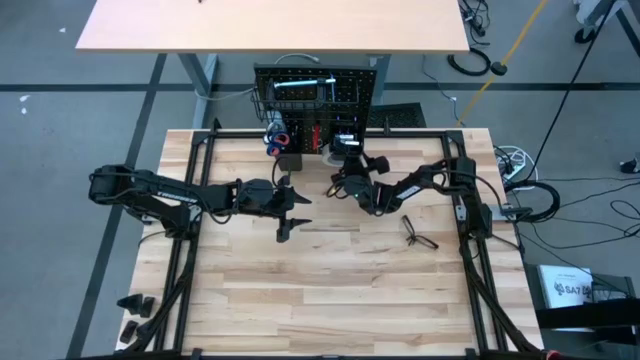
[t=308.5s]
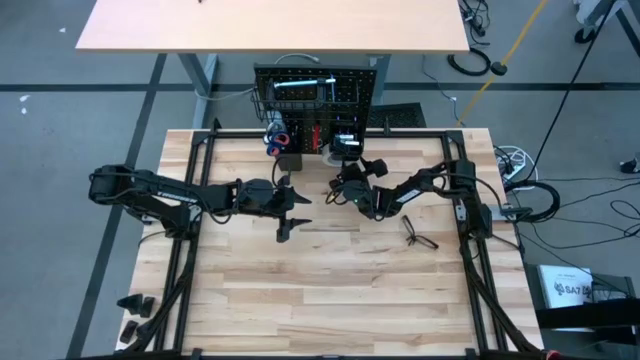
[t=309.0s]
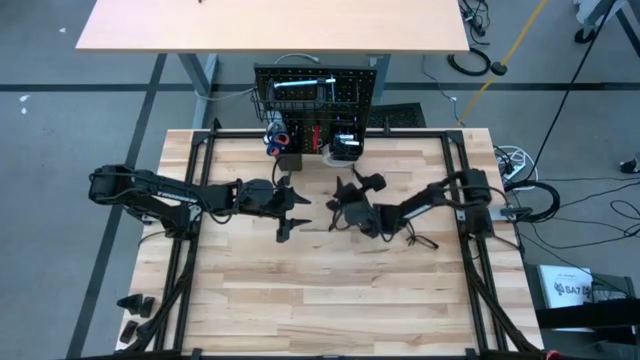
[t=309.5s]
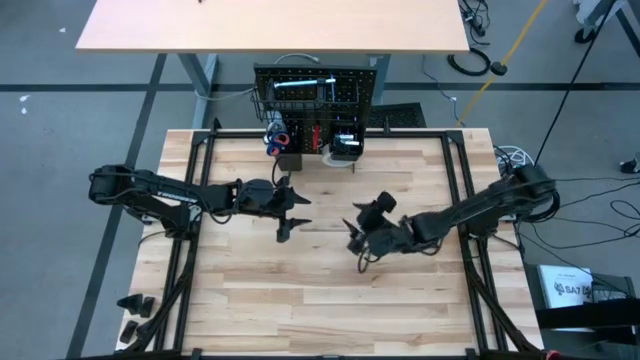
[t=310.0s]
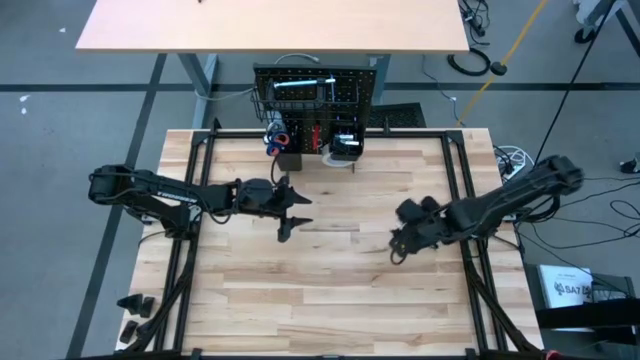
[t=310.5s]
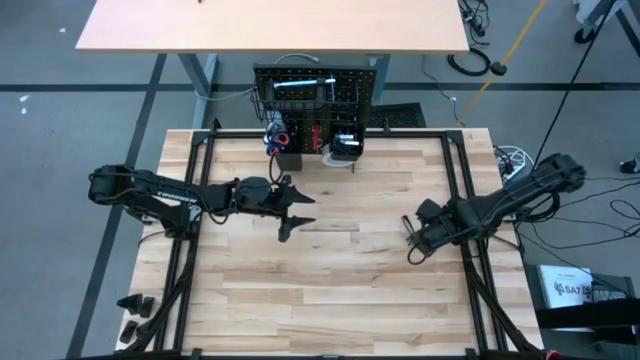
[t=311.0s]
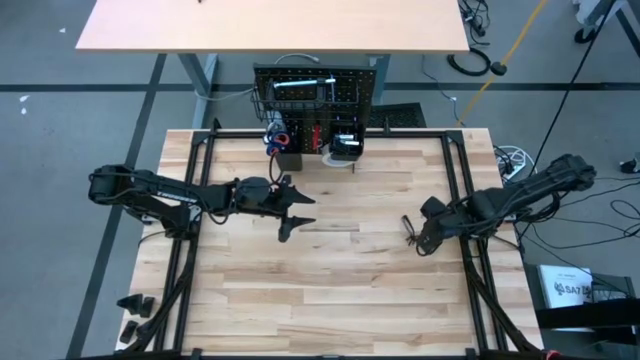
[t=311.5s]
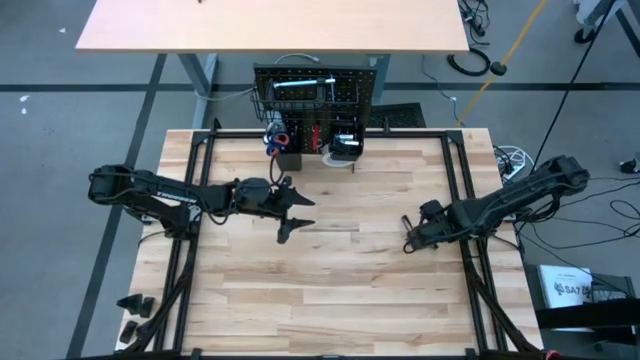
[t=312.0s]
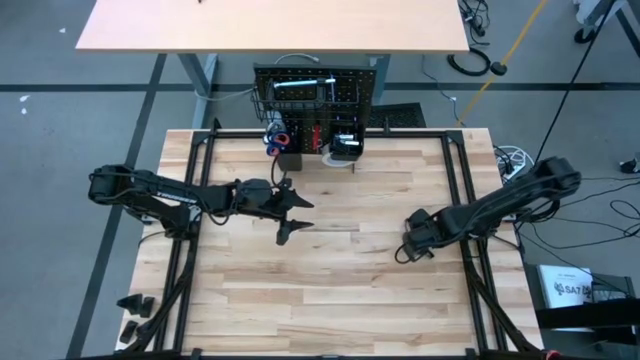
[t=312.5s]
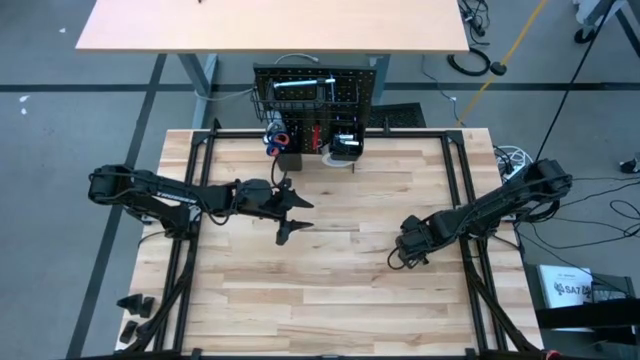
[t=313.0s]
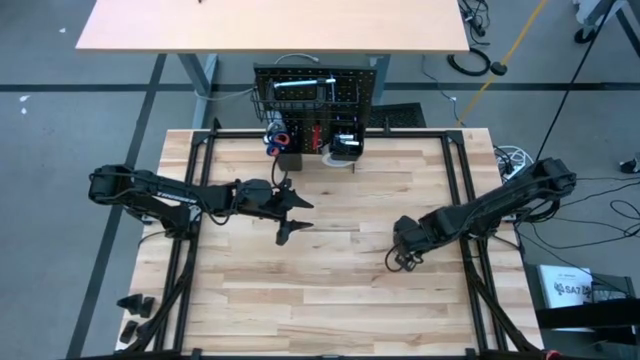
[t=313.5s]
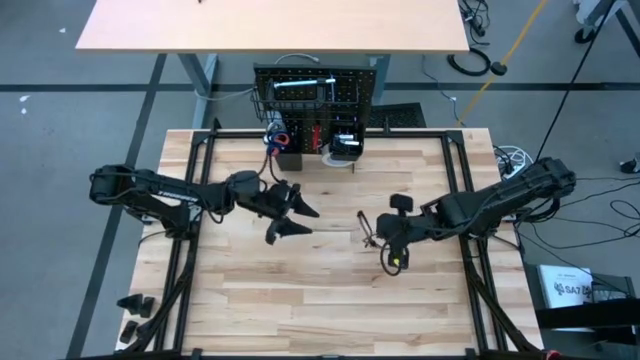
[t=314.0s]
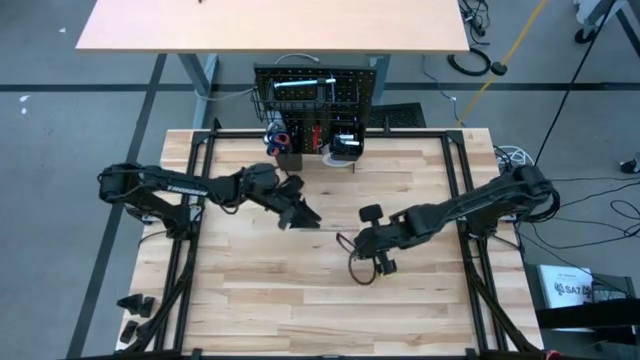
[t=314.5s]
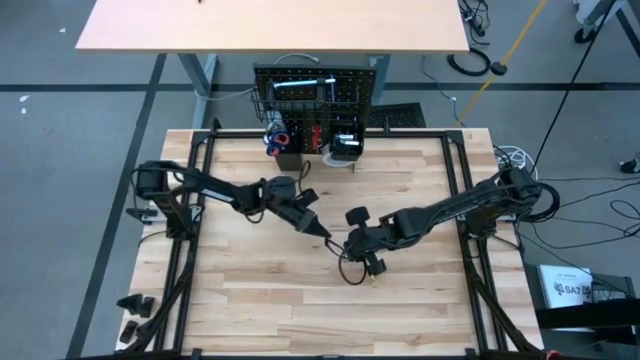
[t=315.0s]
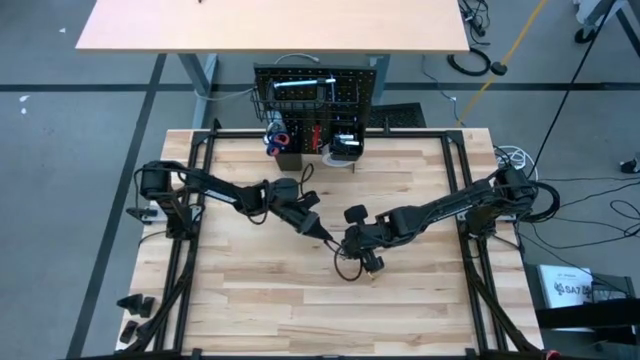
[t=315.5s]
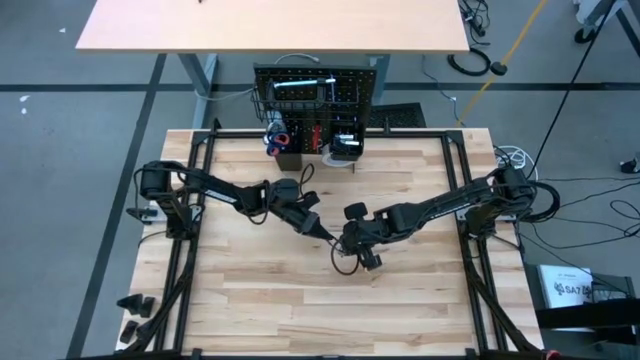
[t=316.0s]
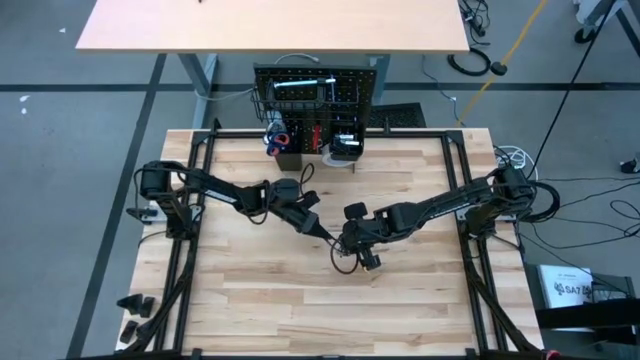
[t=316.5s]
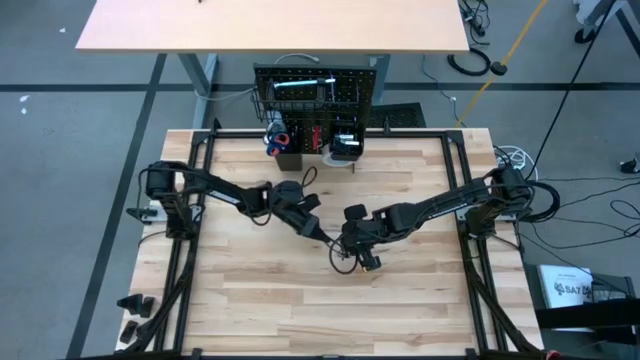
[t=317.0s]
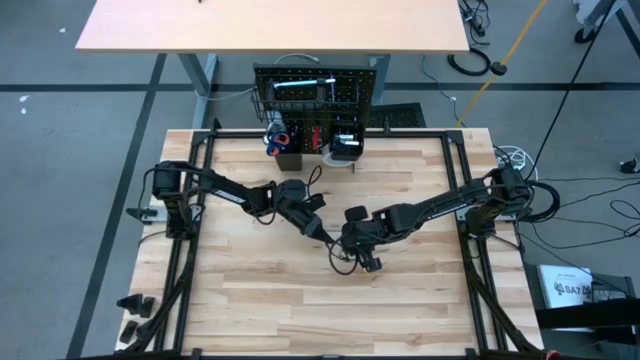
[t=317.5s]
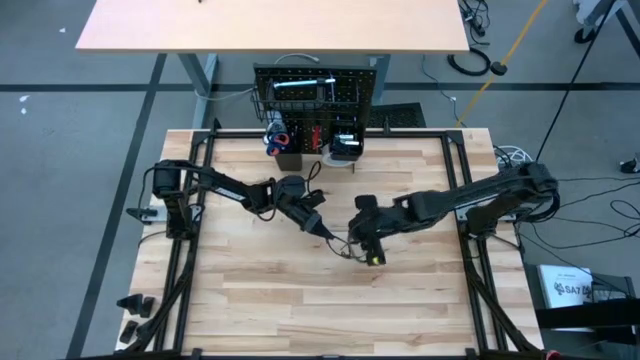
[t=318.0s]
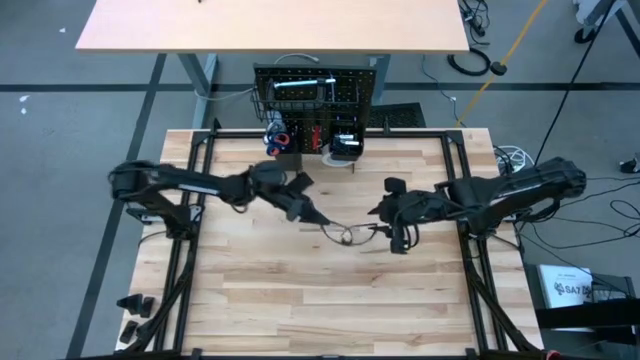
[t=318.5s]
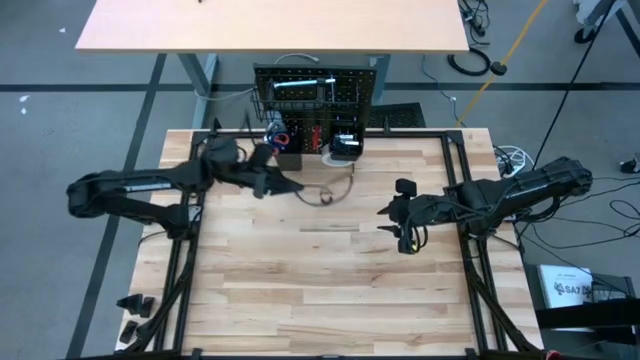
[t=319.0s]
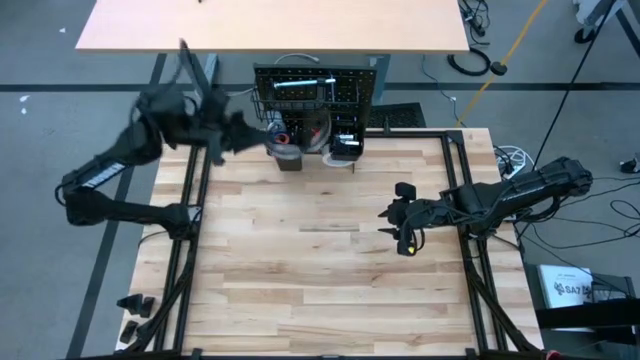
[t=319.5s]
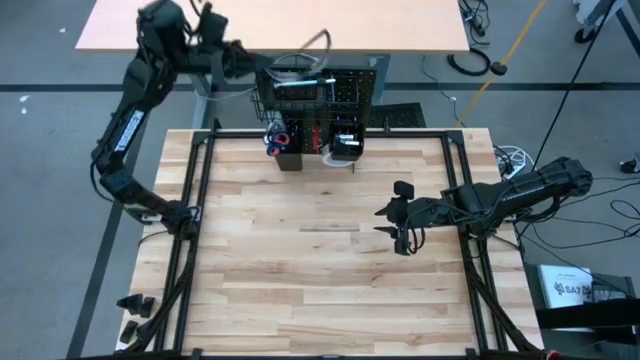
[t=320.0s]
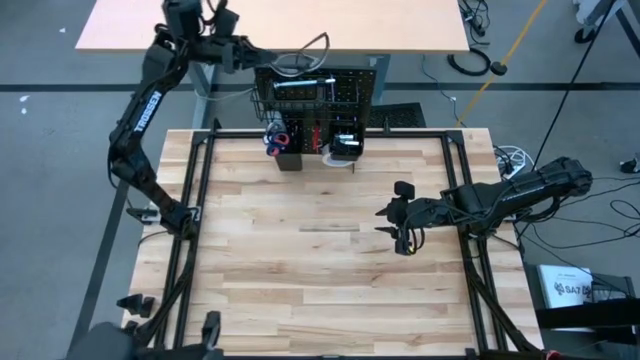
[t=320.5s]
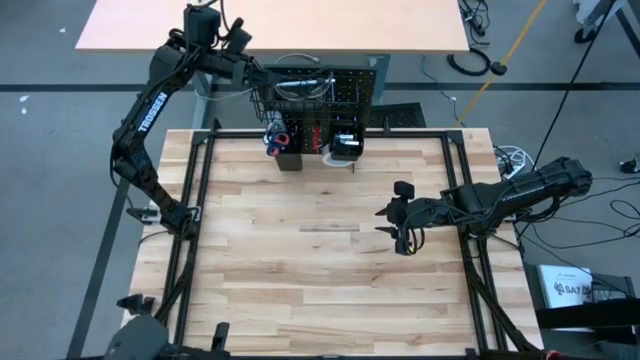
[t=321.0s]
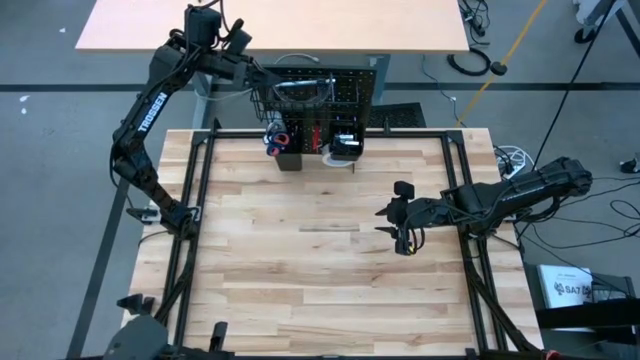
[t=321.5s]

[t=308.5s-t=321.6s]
Task: Hang tools onto peg board
Put the safety goggles on the top of the pegboard

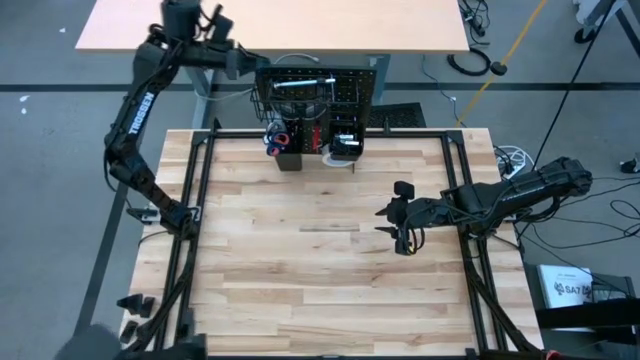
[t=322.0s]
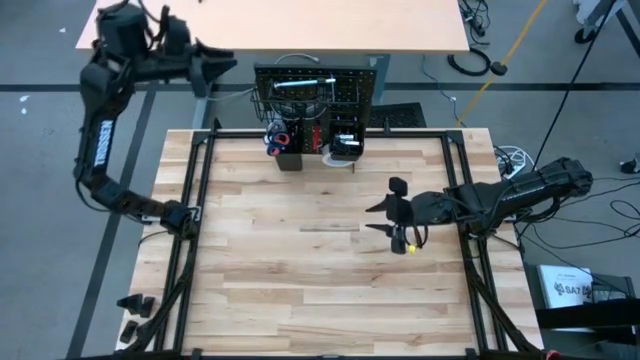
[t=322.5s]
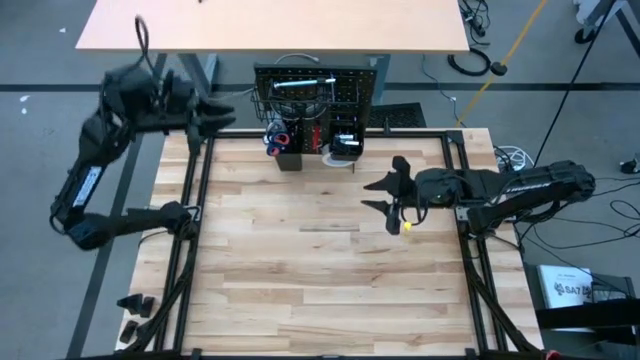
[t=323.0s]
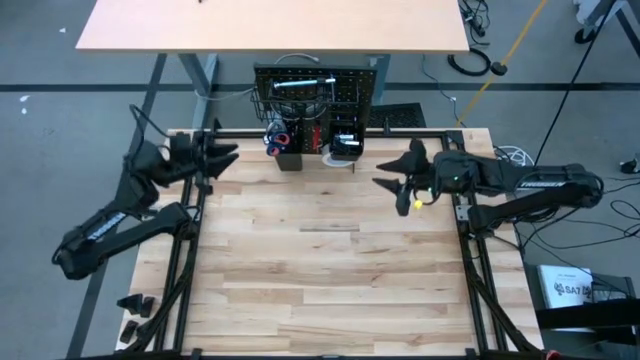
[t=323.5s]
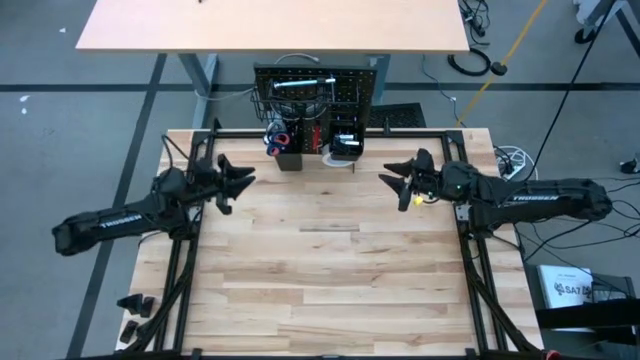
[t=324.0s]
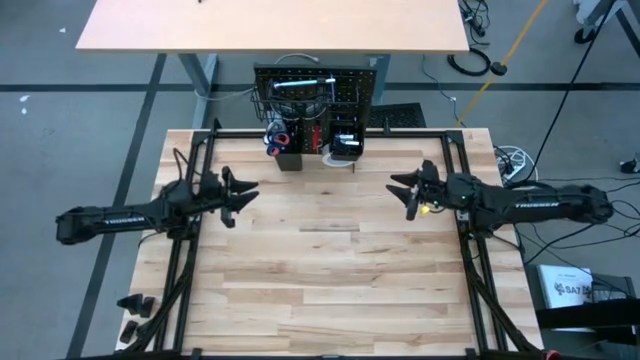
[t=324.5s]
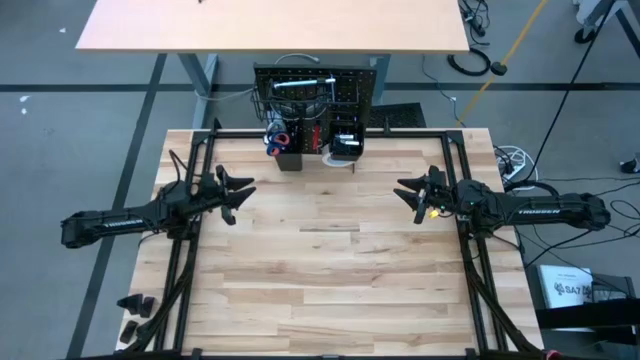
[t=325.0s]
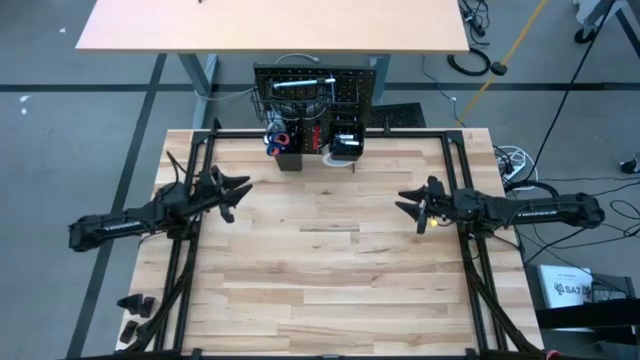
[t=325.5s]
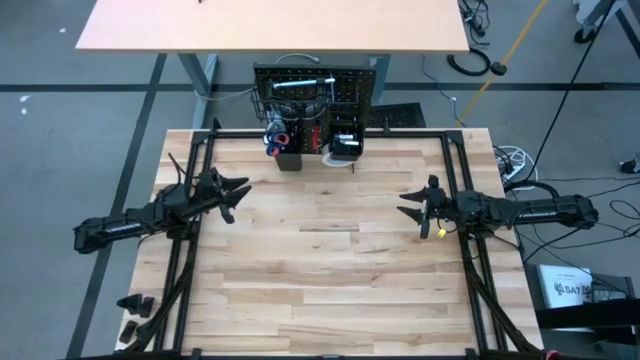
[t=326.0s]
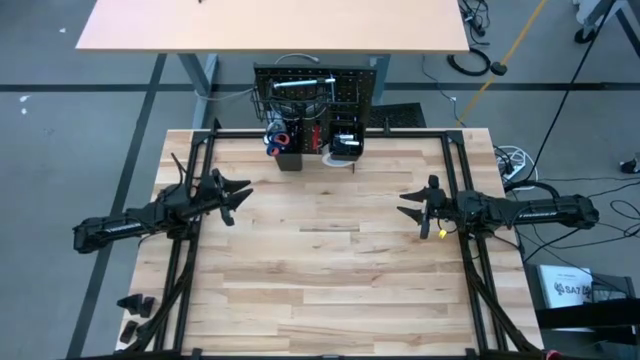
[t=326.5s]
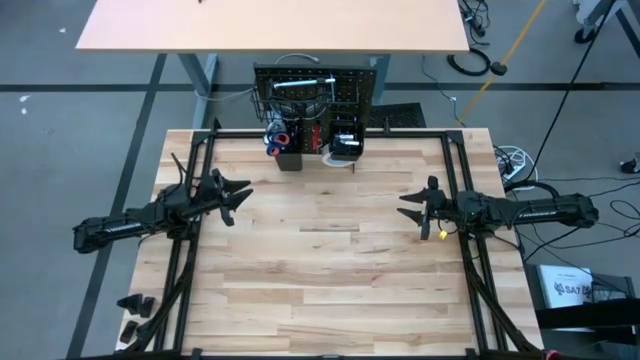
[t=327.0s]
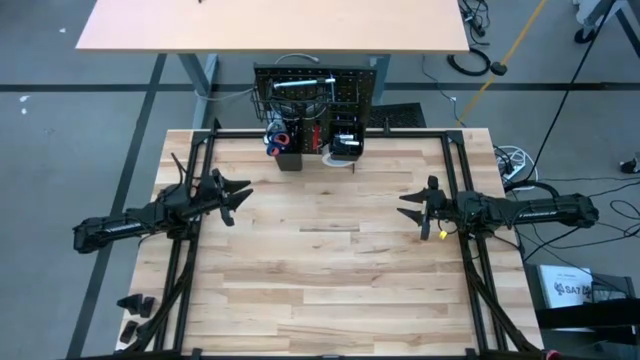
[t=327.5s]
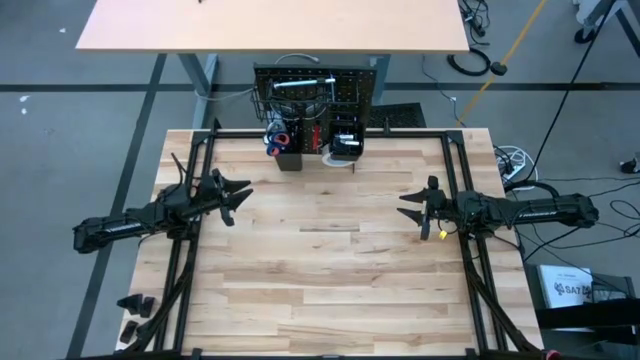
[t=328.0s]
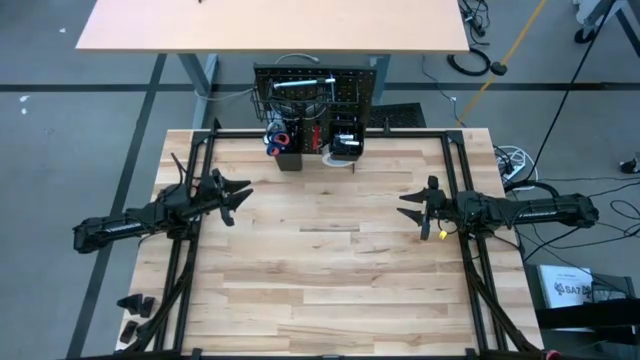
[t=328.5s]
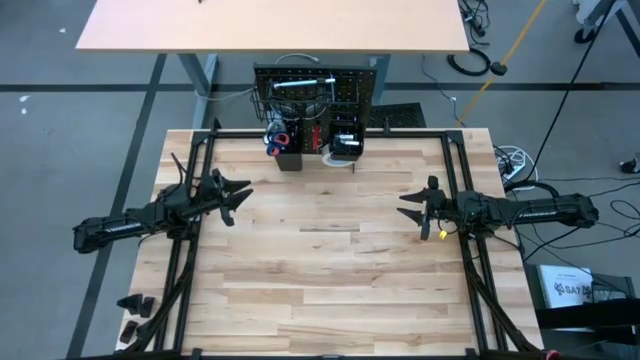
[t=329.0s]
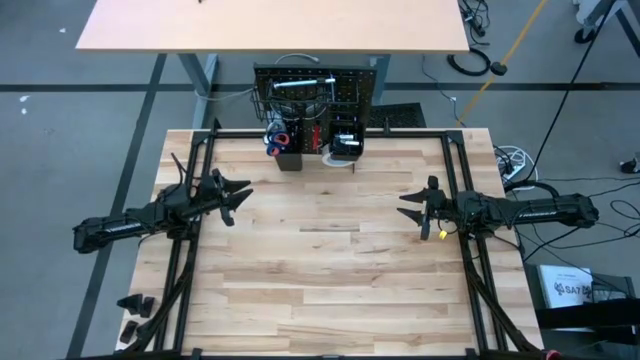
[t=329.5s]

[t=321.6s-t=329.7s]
Return to home position
